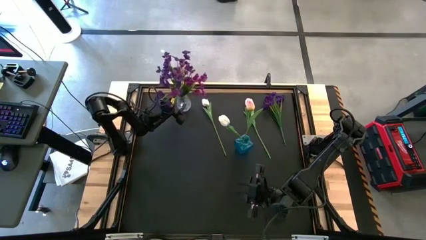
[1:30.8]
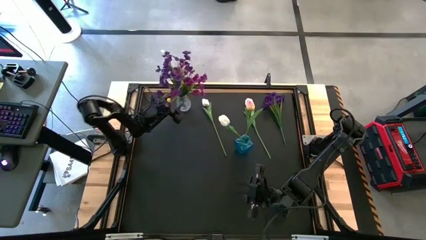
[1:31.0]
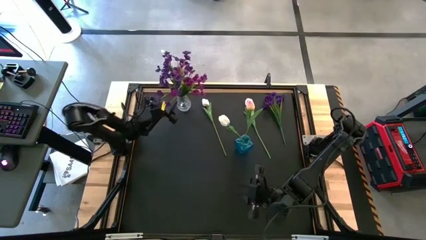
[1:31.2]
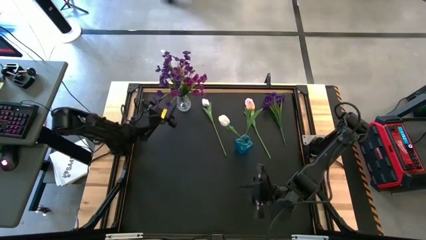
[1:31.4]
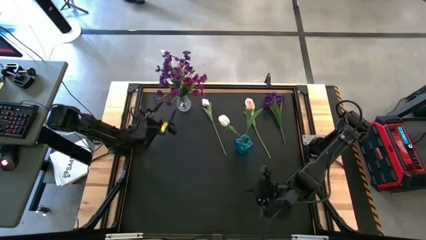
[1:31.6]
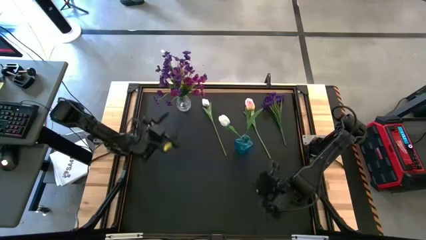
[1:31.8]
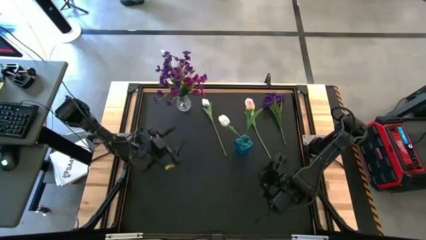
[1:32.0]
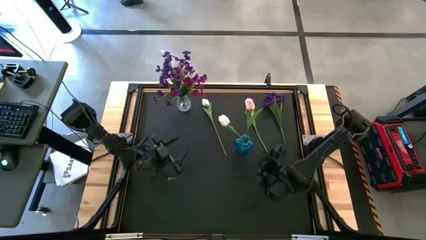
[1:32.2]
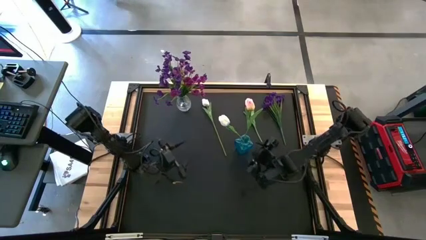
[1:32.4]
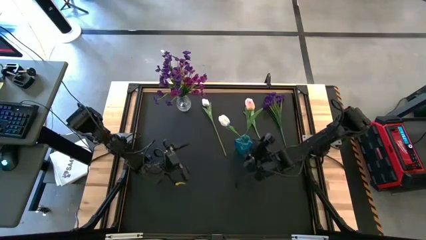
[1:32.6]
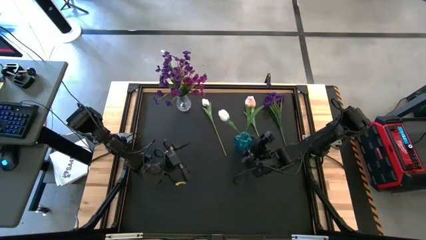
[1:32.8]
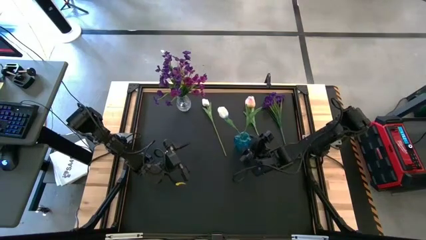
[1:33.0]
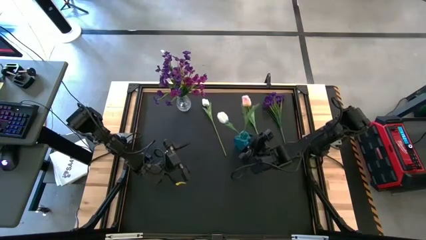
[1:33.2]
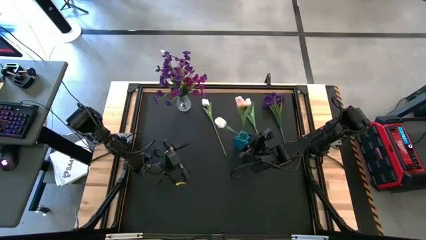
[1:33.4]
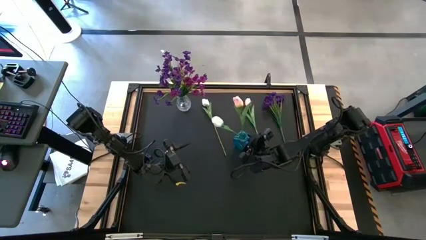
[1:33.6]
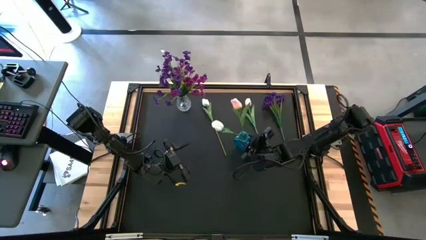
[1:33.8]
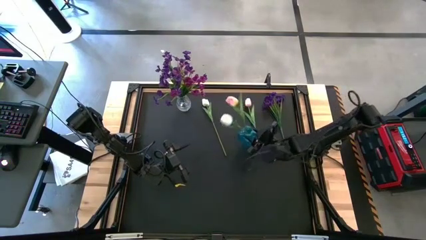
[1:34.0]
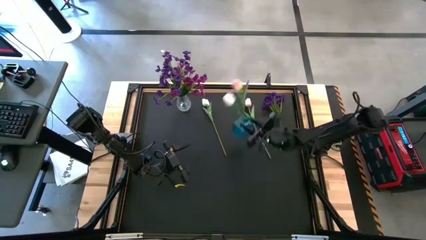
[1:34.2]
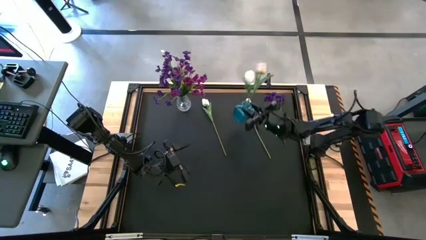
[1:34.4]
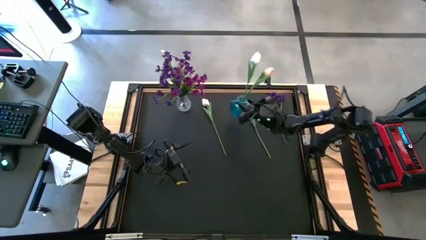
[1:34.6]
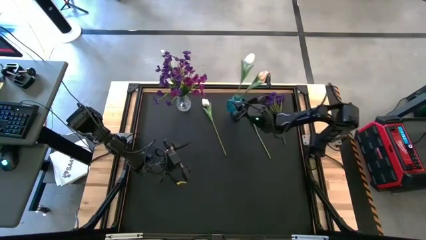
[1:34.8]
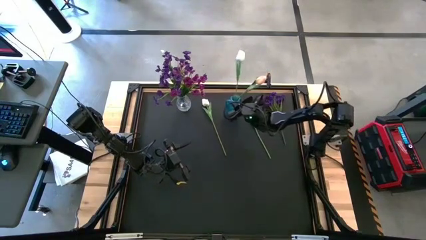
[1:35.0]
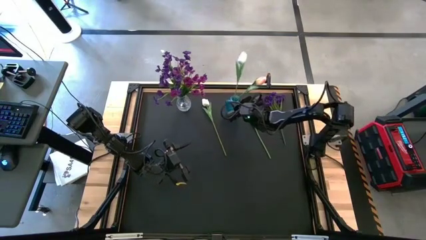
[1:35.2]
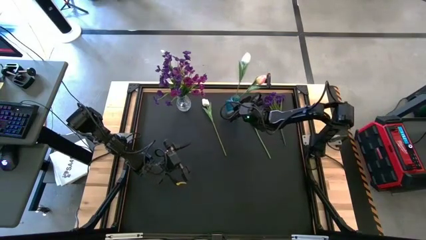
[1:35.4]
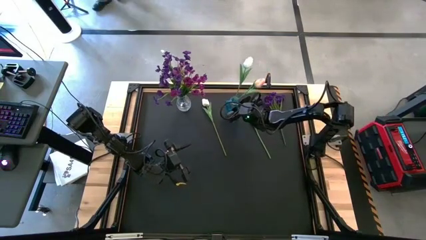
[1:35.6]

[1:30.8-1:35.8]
Task: Sort flowers into vase by color
Move the blue vase to the top center of the table

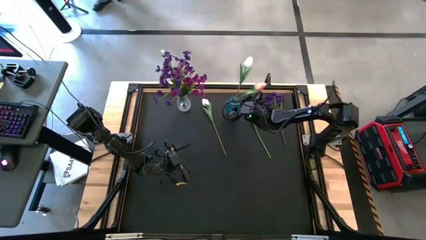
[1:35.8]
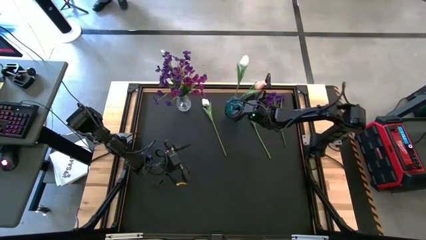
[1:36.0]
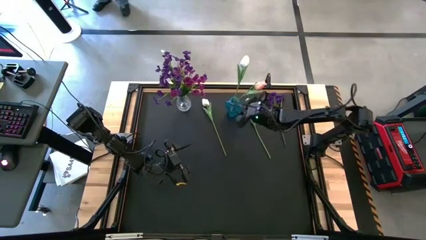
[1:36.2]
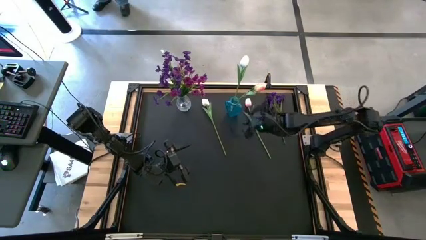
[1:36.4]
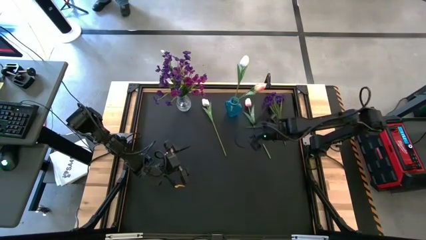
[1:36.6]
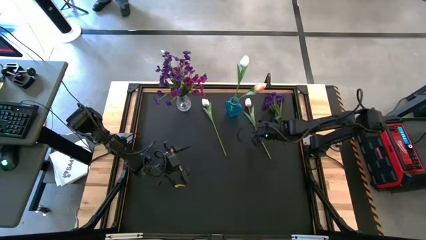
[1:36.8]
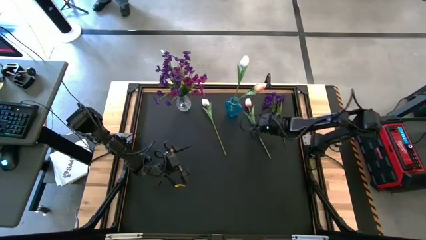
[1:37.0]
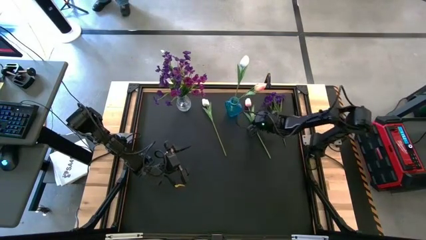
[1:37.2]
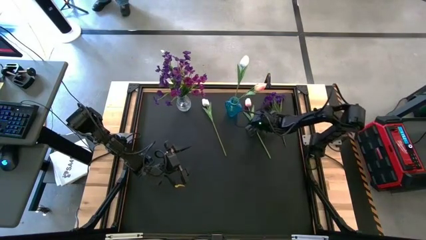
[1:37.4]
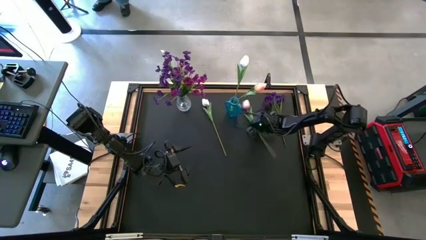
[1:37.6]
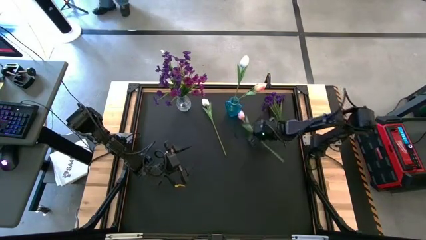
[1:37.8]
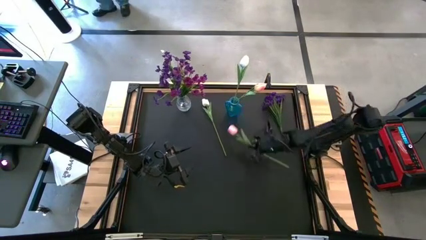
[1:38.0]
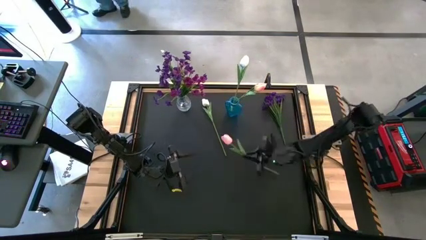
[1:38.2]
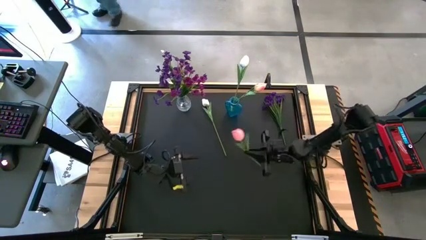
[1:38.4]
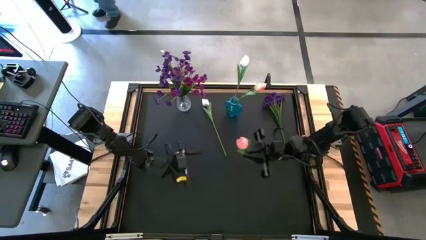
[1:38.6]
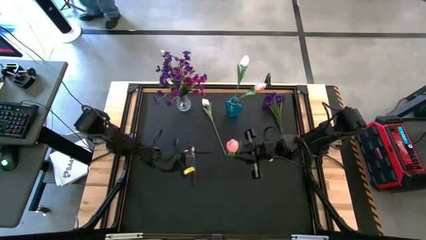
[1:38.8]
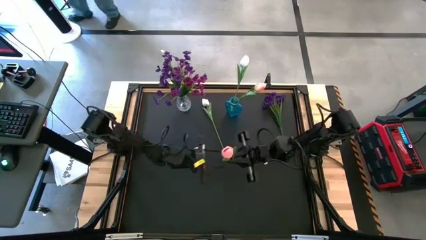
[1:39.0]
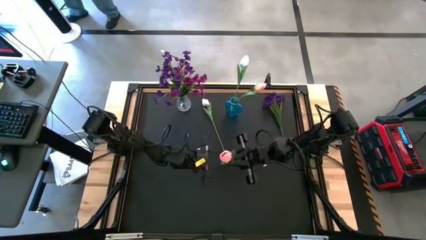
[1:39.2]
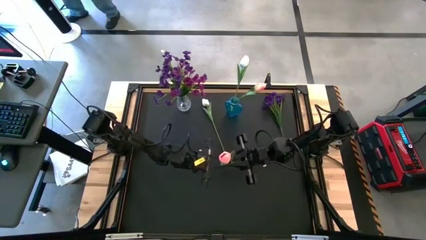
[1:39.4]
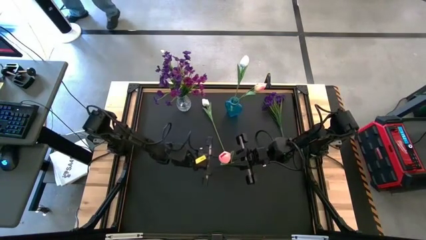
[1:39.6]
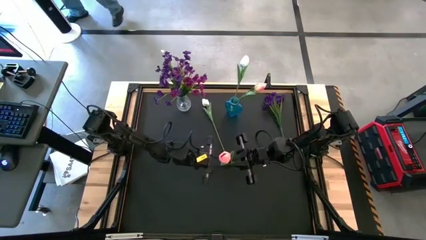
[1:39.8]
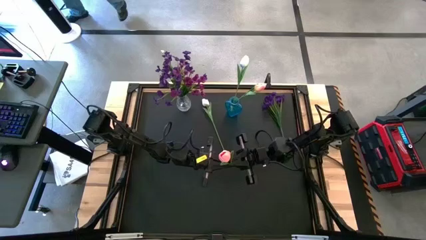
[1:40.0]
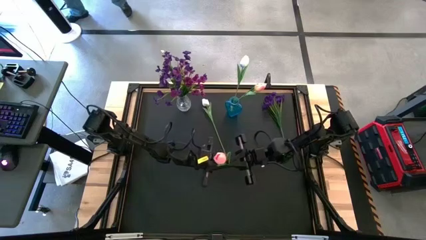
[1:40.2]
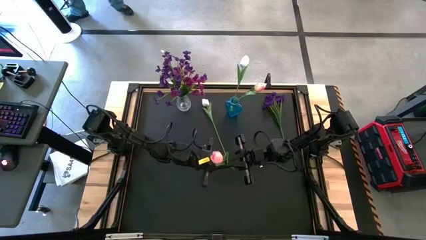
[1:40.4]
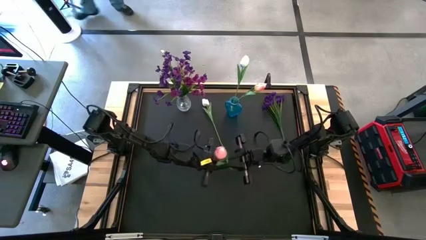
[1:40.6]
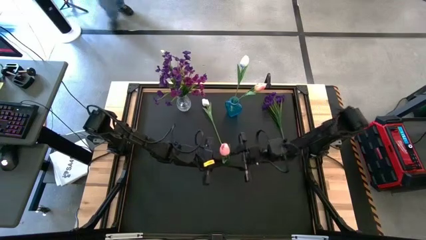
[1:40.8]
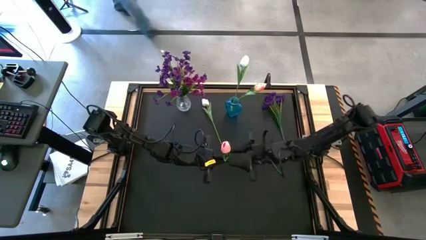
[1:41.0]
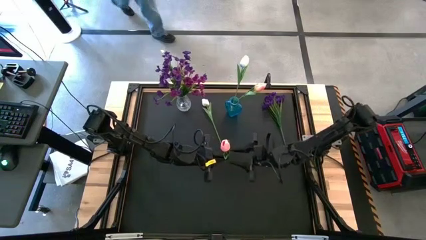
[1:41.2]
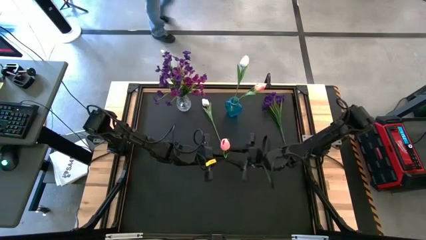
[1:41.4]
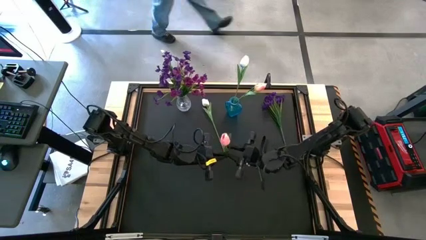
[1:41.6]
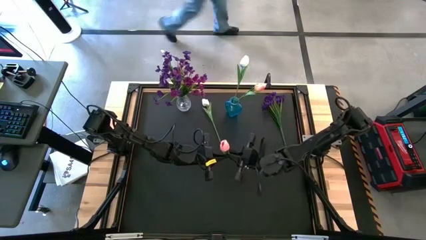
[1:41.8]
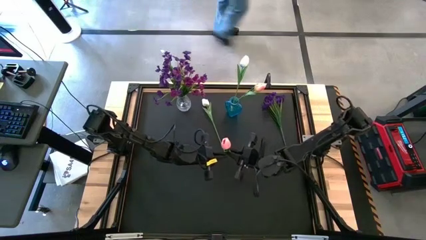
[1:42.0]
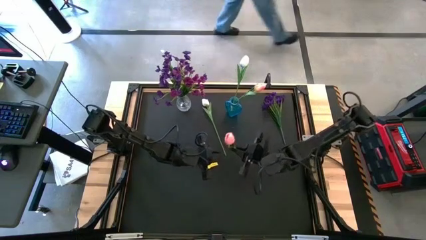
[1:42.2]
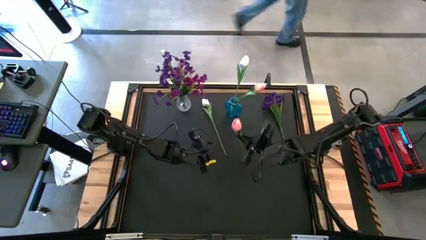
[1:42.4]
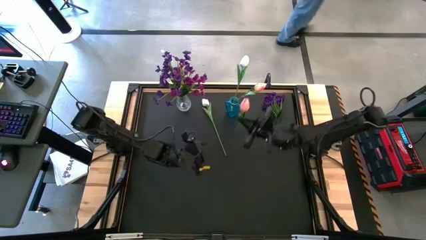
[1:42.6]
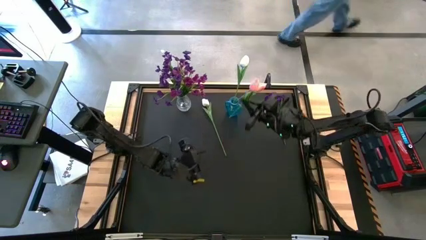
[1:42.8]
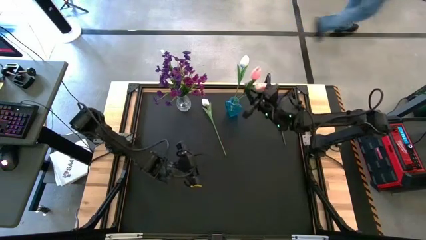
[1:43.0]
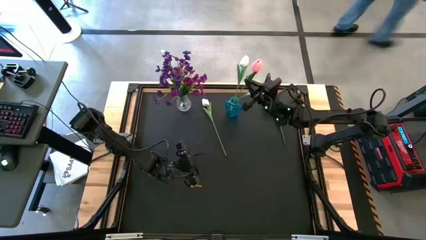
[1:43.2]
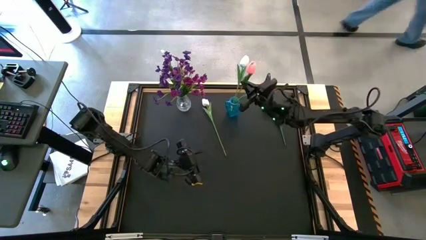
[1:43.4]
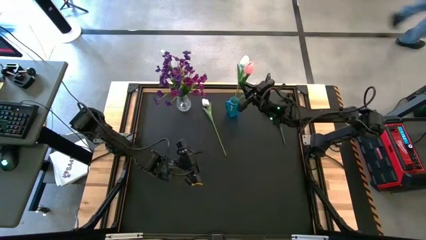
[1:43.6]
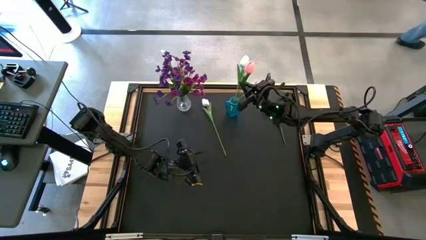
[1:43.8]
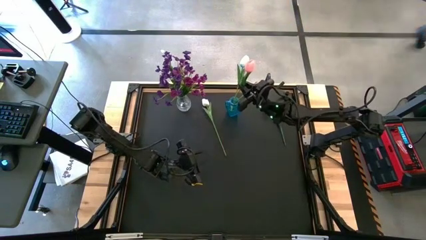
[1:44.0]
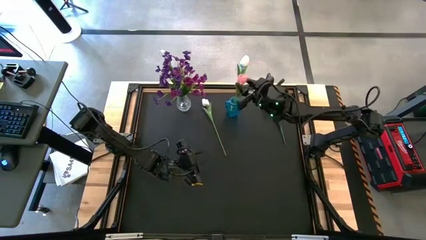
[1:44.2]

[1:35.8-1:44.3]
Put the pink flower into the blue vase

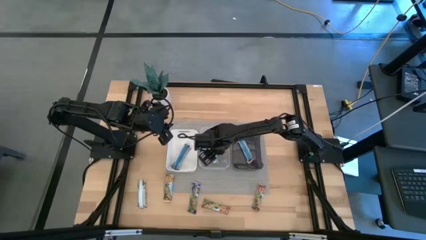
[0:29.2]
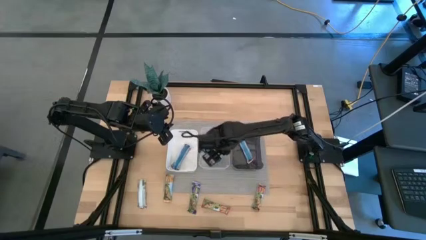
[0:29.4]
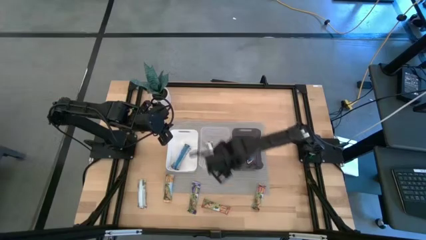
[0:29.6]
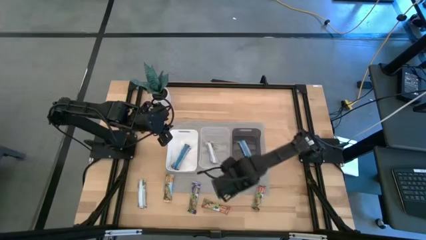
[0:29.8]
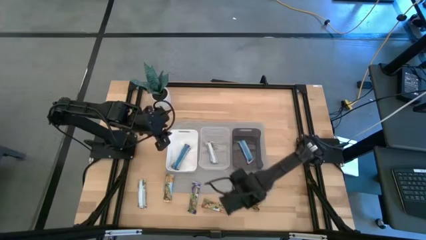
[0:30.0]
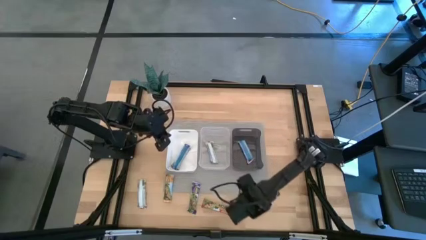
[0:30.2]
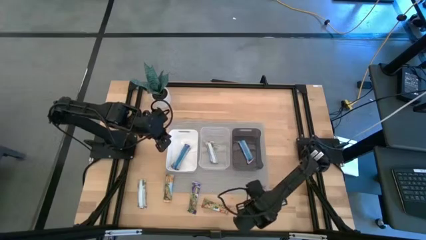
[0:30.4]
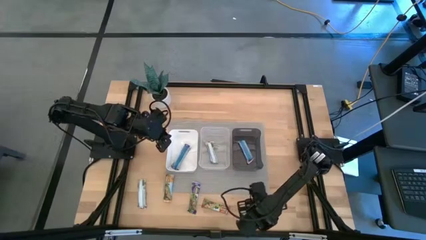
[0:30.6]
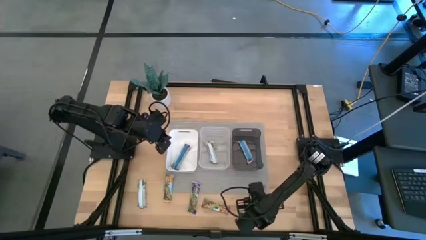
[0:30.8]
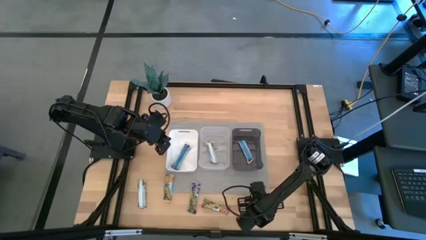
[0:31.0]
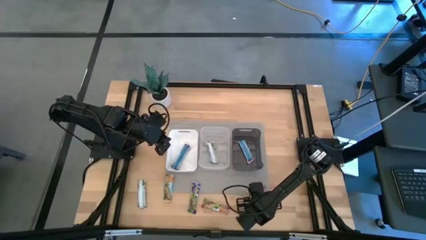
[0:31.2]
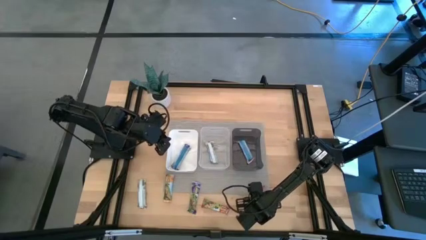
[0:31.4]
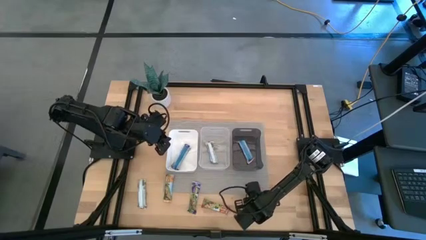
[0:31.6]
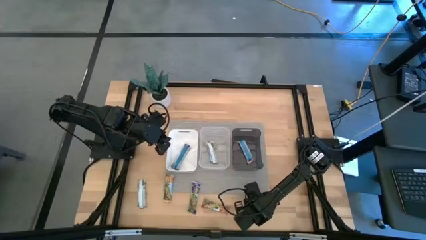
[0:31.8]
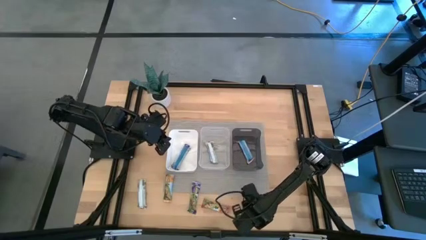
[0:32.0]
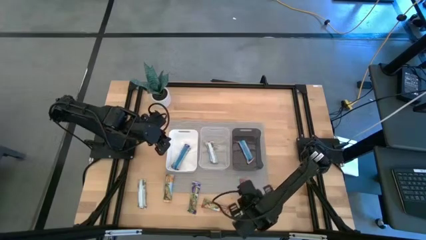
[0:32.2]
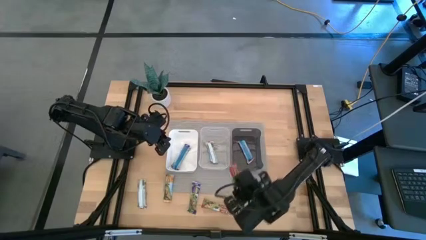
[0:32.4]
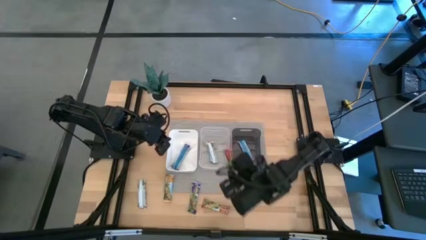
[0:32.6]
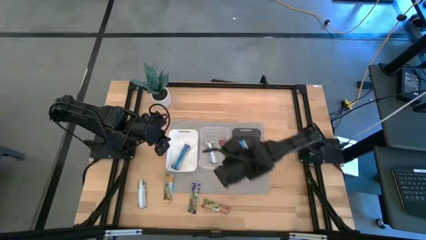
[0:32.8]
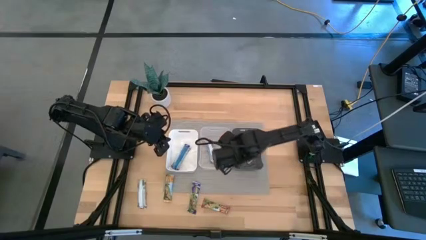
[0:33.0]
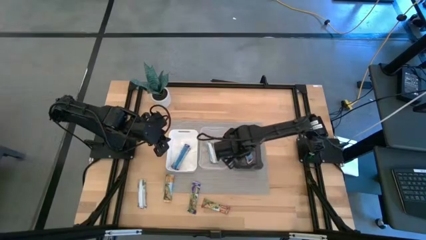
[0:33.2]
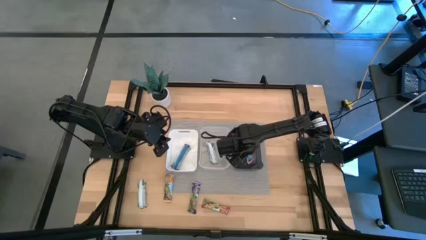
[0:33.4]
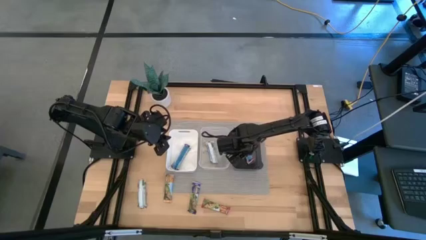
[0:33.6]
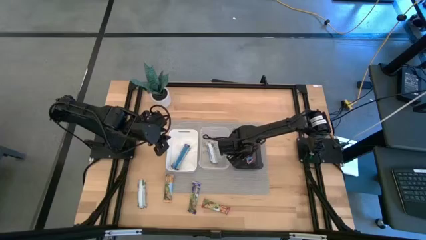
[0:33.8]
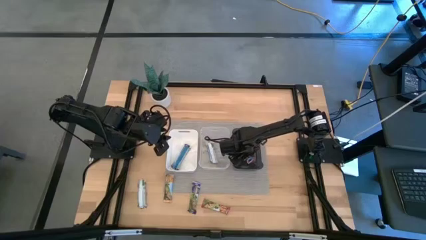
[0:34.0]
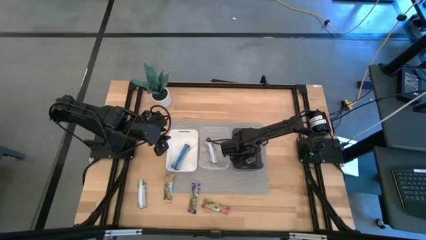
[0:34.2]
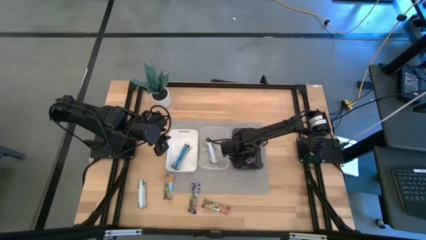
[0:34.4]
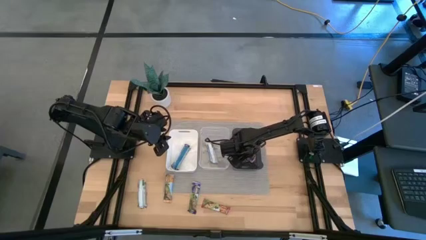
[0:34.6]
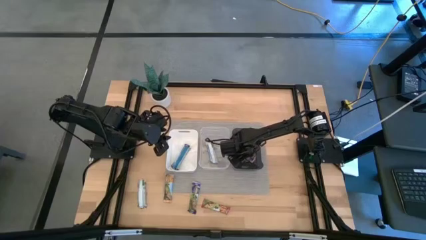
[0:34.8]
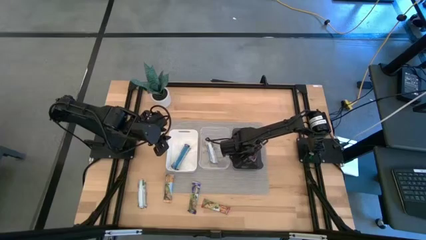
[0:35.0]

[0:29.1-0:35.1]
Task: Pick and place Granola Bars by type
Put the right red granola bar into the black bin
